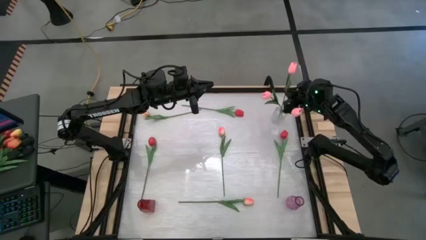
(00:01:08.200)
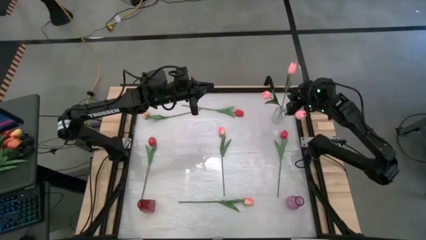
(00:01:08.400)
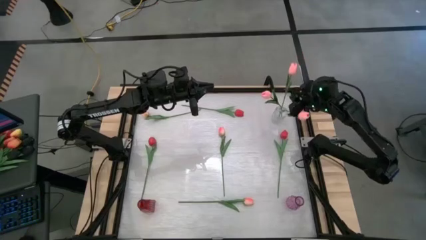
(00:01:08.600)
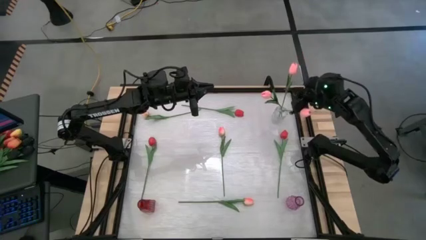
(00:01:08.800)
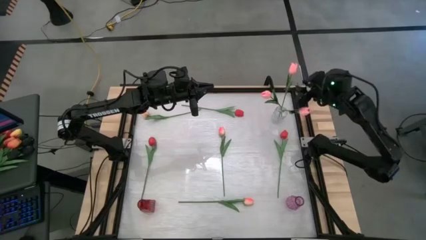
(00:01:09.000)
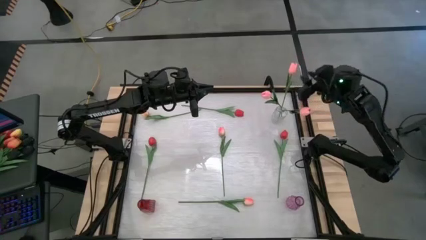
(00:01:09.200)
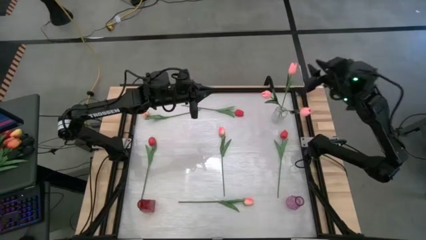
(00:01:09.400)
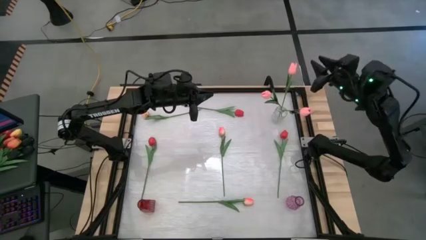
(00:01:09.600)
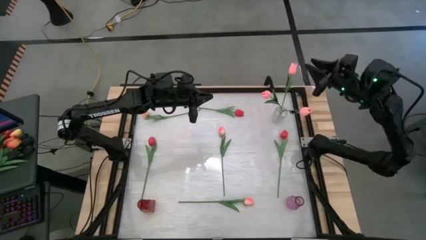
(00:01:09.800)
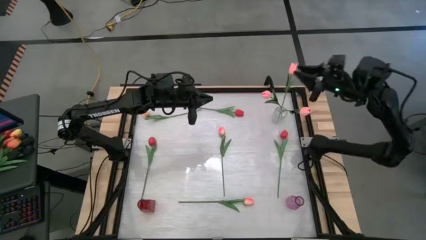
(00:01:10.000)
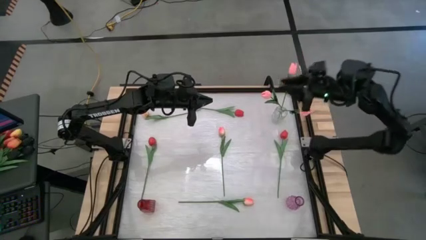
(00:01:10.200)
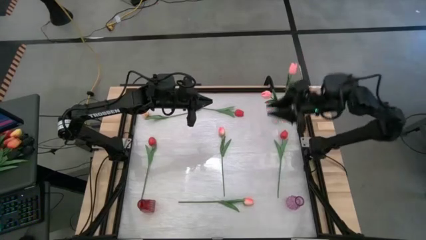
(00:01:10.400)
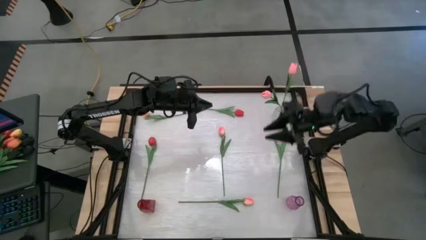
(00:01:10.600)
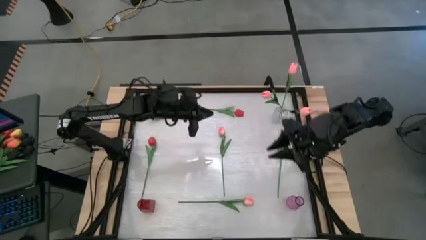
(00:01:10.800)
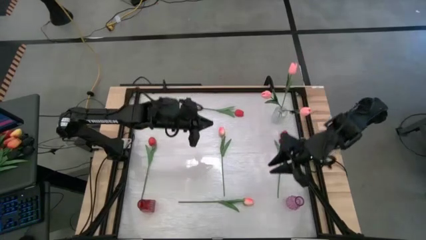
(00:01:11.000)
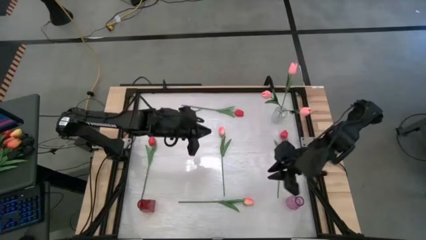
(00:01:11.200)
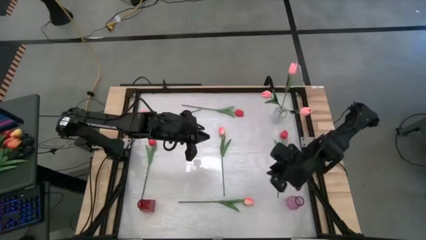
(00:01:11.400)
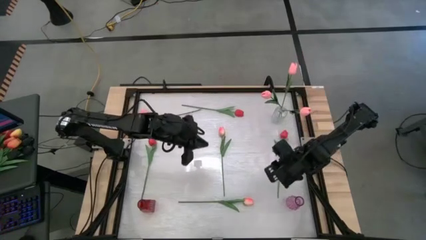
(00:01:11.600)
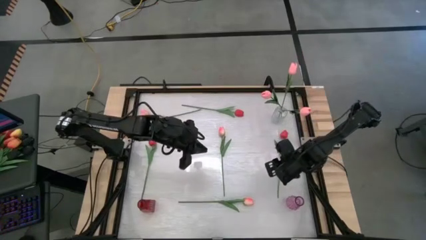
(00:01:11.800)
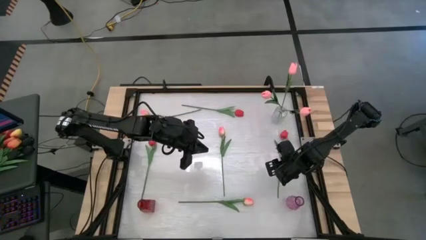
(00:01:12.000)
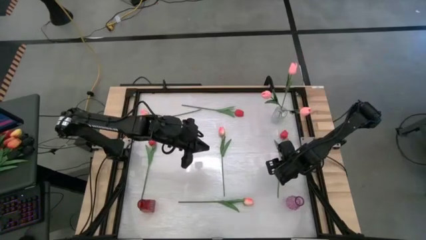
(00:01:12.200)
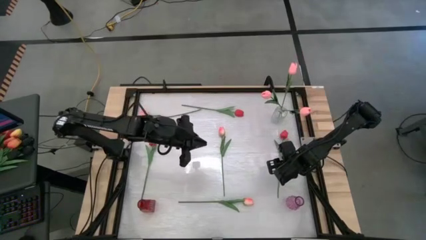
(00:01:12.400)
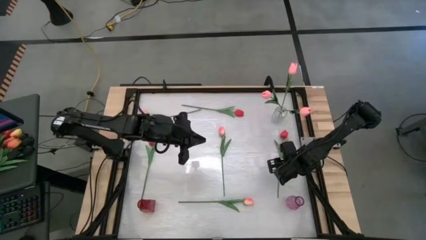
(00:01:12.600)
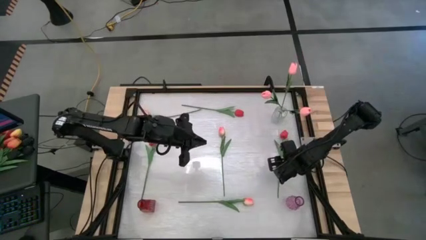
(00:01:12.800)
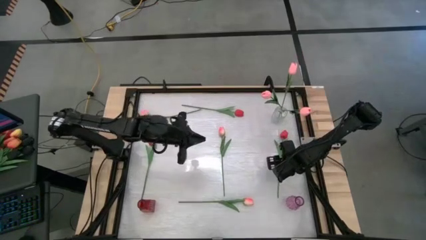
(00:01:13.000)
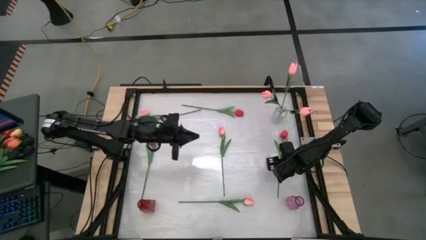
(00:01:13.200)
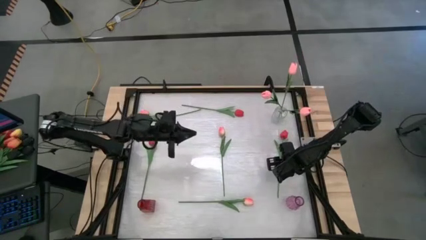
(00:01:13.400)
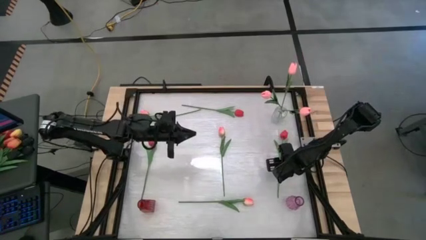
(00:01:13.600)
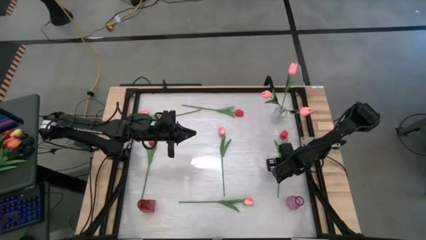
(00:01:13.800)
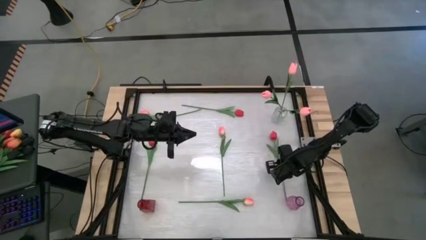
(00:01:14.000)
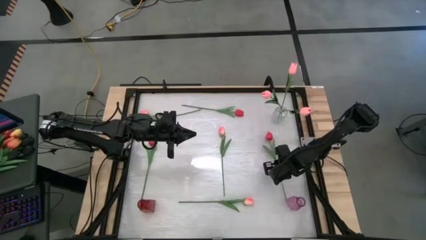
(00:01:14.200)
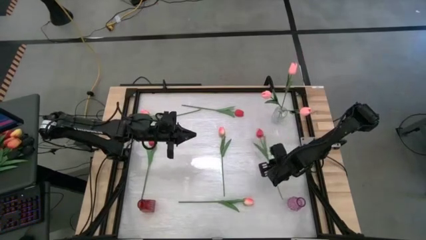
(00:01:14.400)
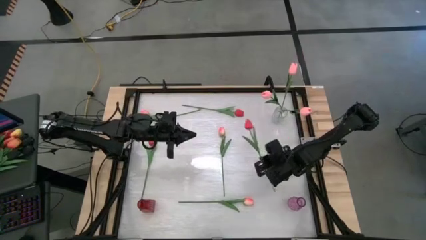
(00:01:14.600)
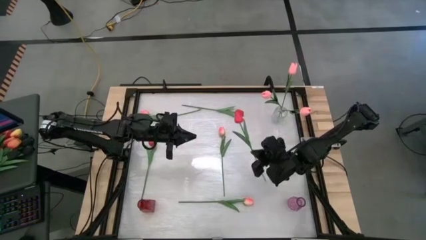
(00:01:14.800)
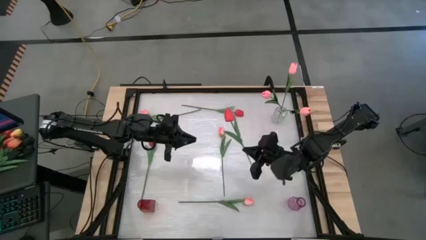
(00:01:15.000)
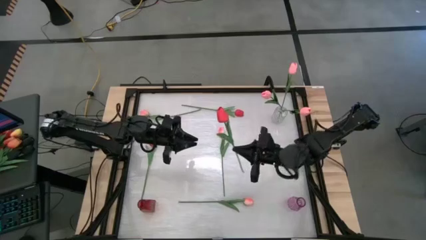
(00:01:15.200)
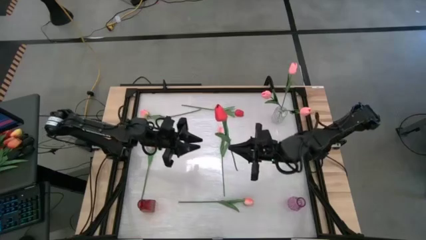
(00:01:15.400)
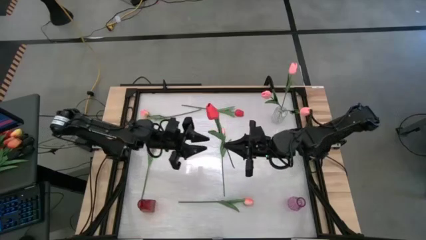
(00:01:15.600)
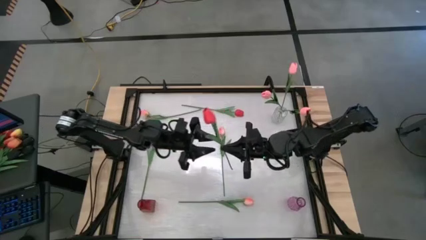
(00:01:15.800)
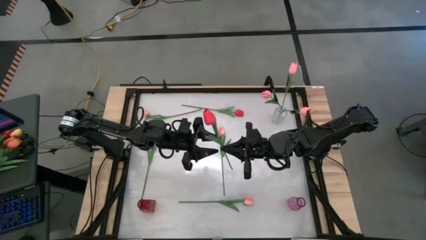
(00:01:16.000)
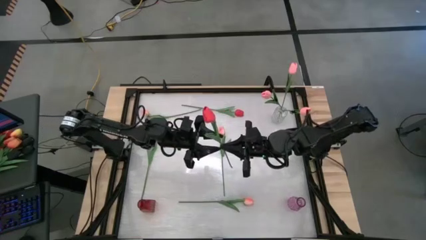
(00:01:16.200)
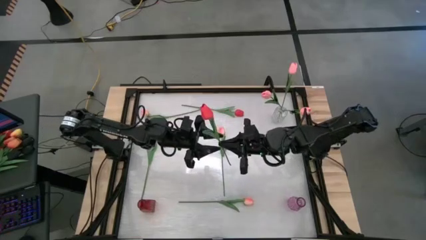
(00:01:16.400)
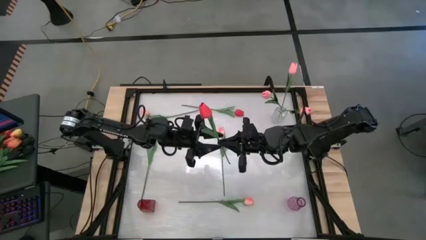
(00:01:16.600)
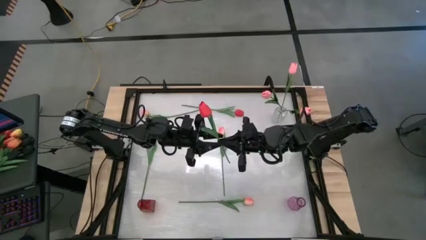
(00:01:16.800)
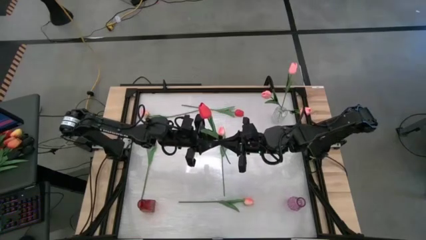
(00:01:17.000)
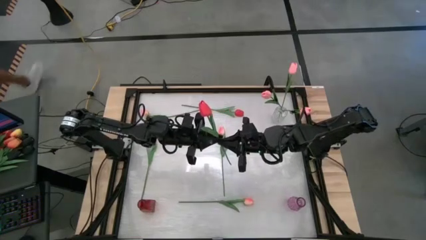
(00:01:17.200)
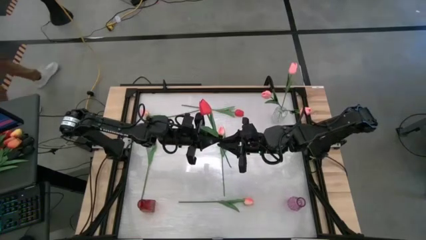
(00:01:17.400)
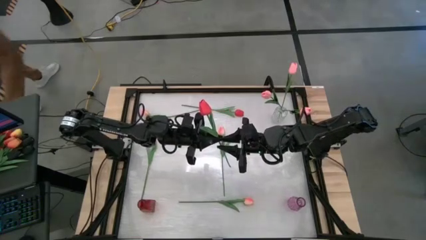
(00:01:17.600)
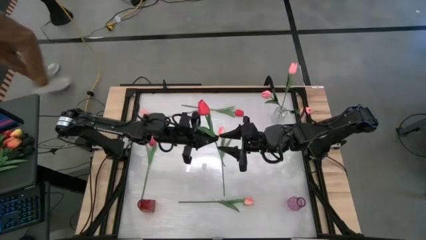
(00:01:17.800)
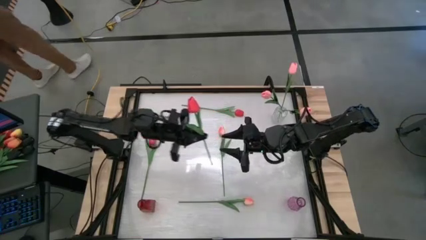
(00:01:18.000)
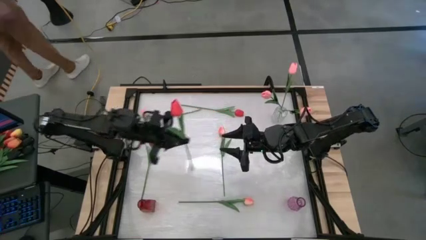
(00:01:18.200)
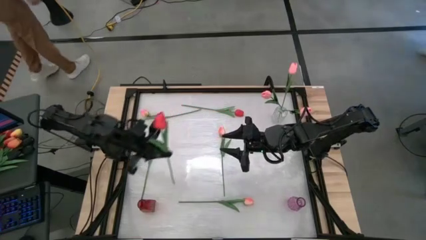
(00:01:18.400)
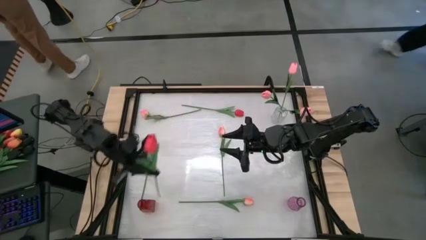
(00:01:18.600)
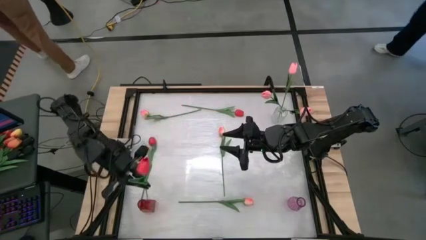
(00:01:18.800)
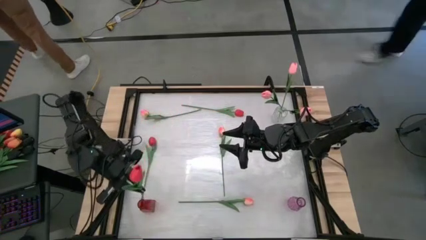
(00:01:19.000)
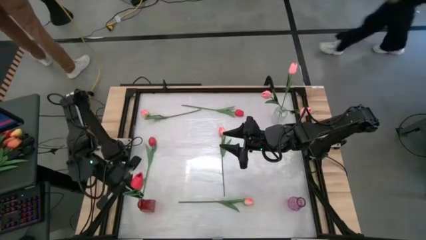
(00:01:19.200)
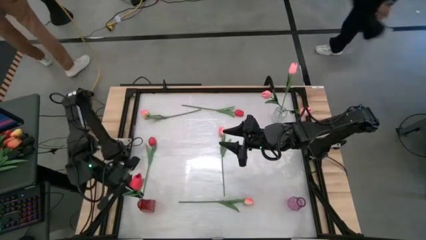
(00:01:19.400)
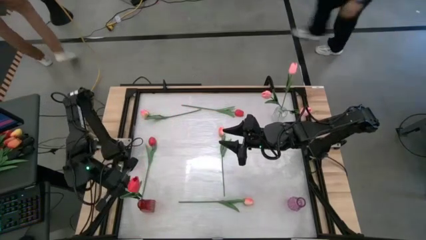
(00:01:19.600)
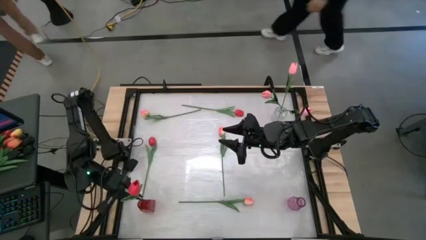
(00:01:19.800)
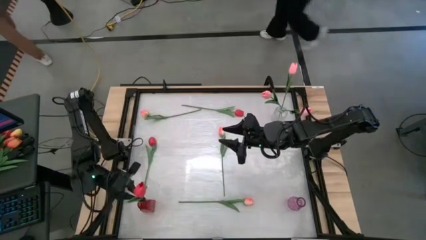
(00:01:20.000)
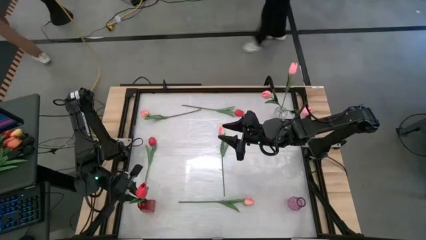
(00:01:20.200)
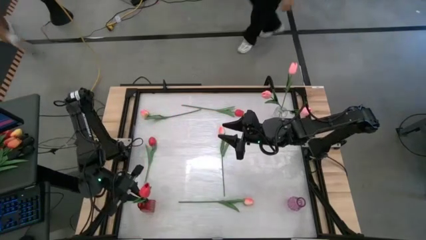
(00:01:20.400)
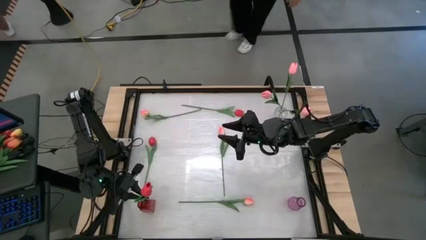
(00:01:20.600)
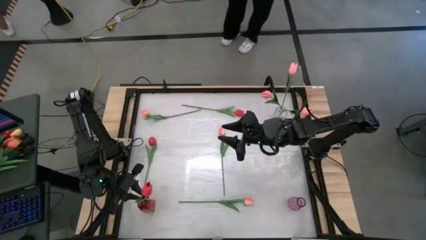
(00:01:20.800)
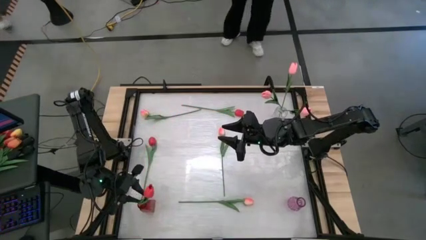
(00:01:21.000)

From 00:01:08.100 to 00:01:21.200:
Task: Sort flowers into vase by color
Put the red flower in the red vase
